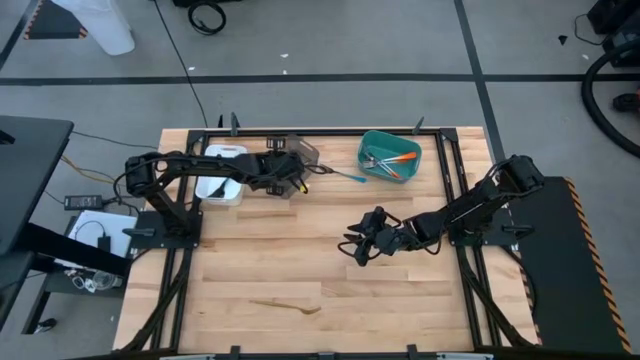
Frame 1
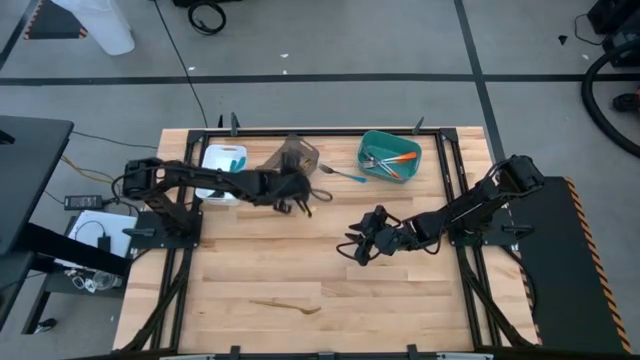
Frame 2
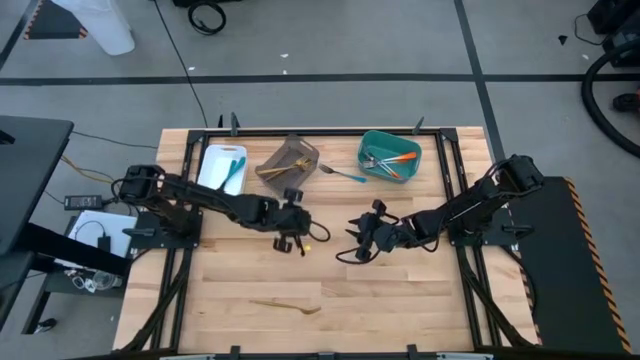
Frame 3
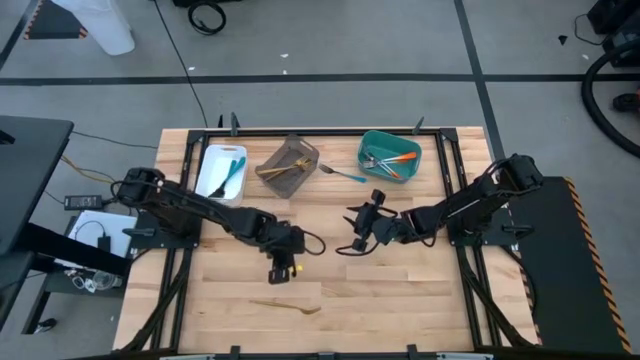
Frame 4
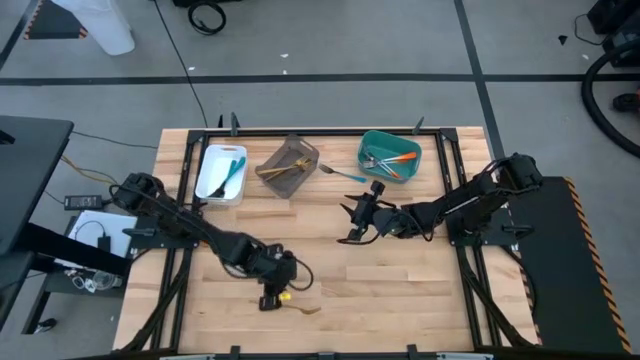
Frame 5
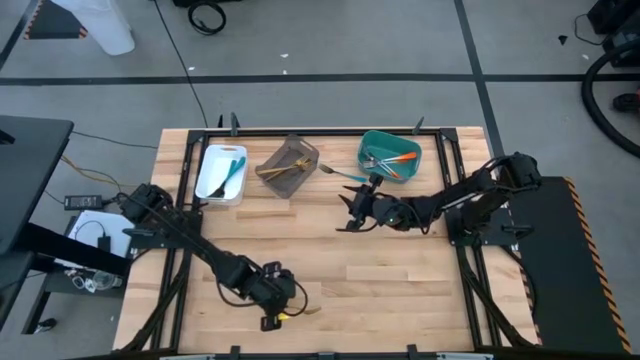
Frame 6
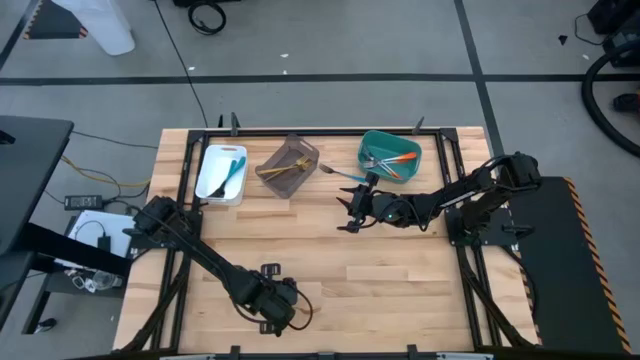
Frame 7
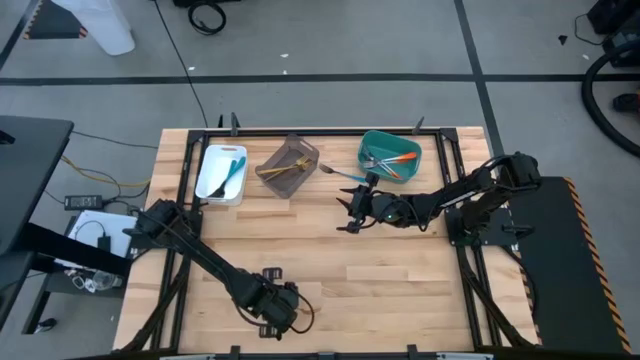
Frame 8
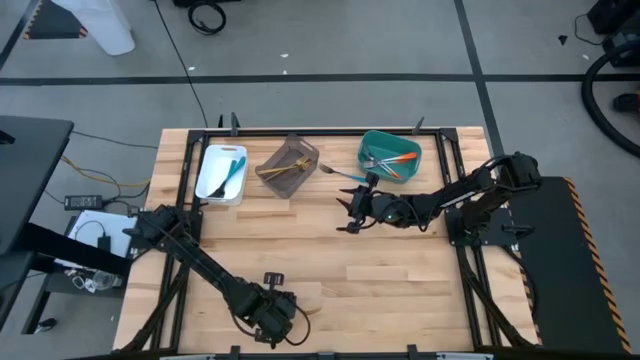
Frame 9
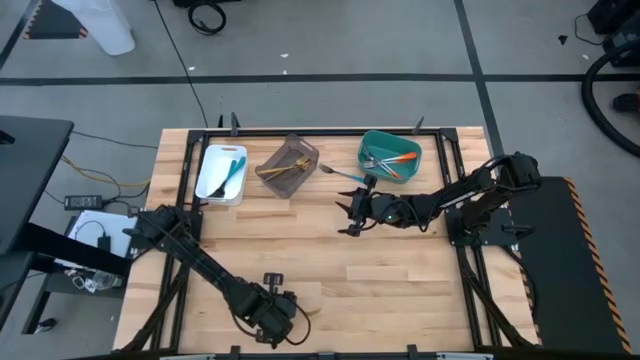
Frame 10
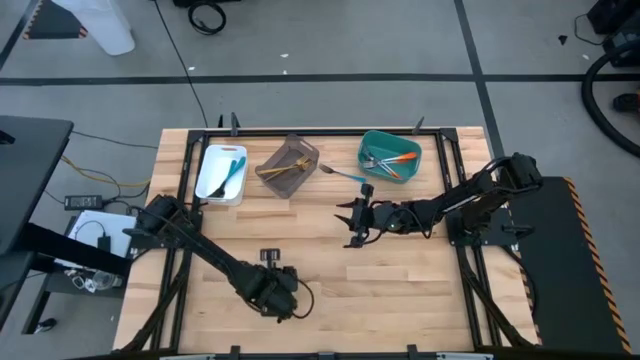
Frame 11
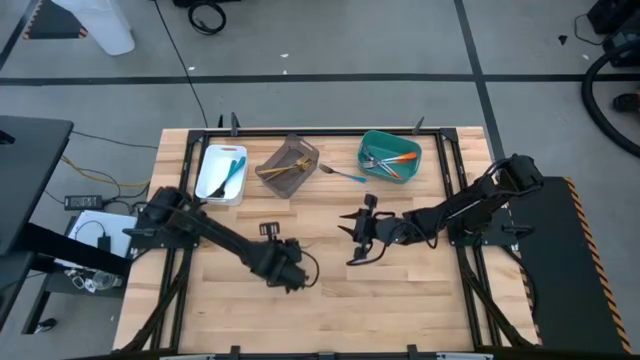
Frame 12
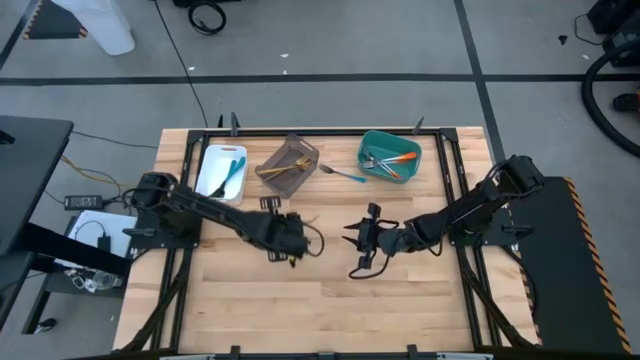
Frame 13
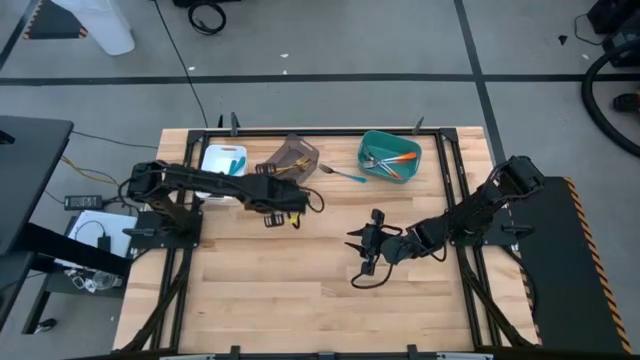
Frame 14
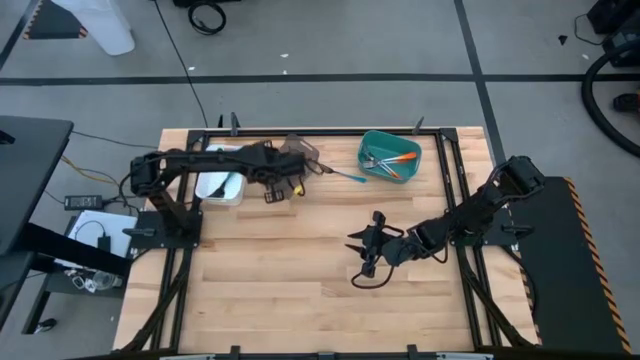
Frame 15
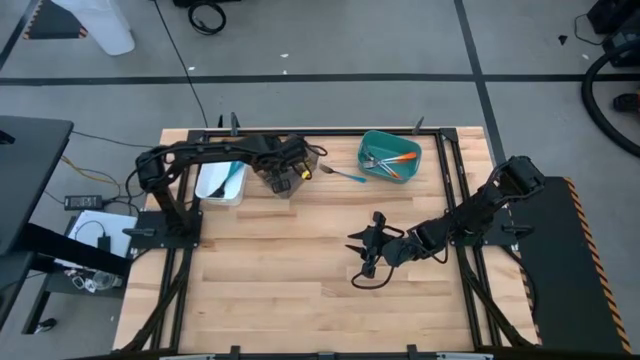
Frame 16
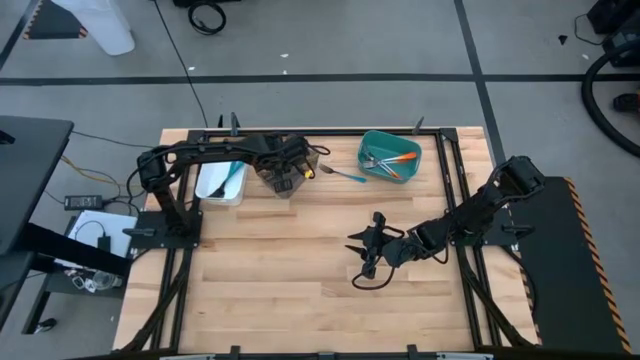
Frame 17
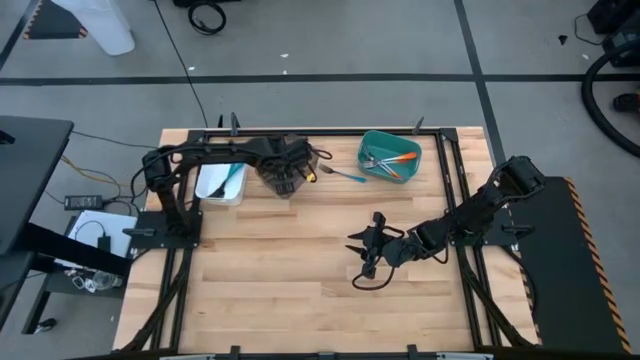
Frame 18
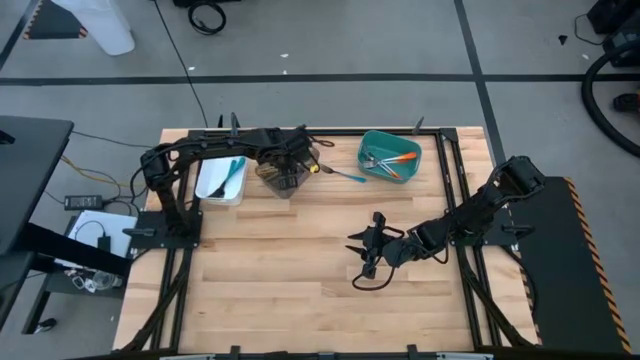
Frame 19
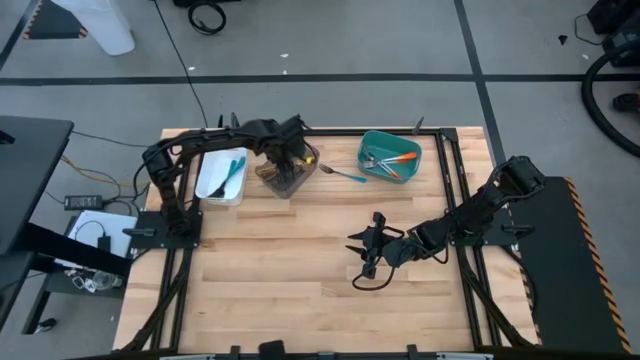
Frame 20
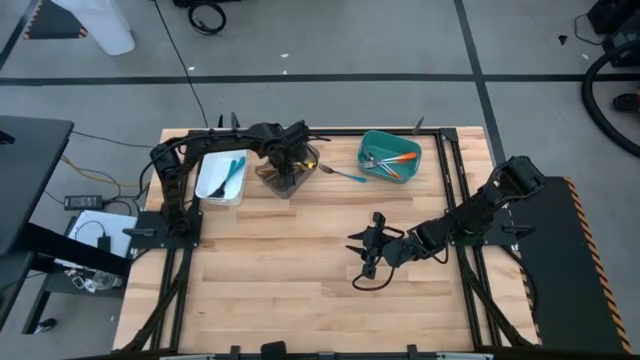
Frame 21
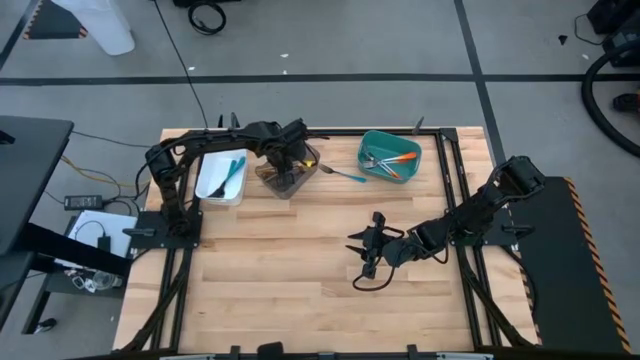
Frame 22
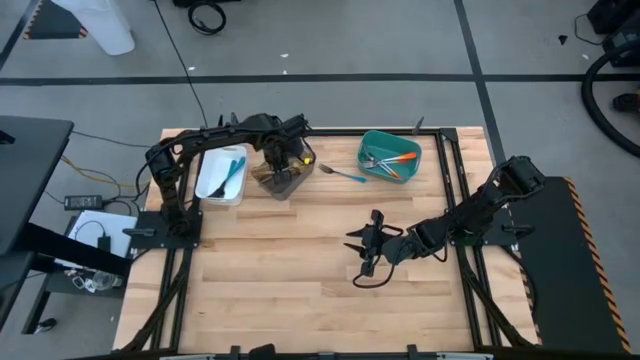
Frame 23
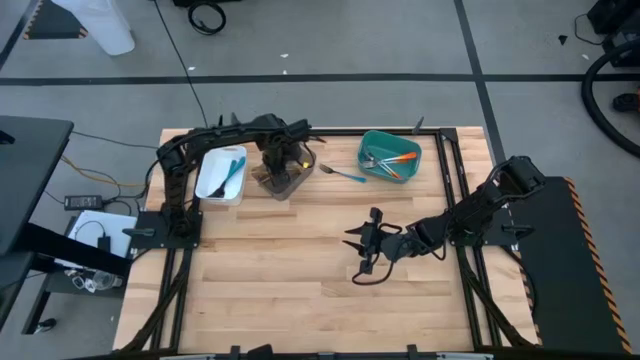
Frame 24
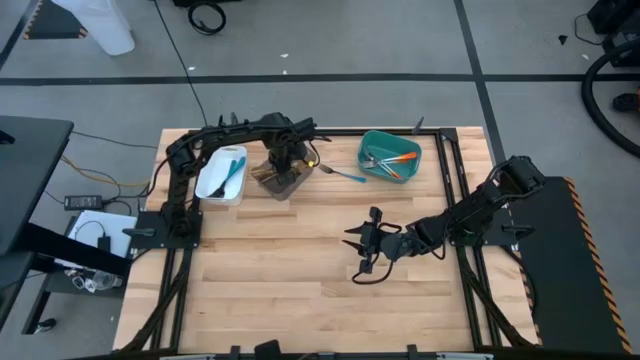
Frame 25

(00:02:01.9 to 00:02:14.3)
Task: Sort silverware by color (type)
Put the gold fork into the black bin

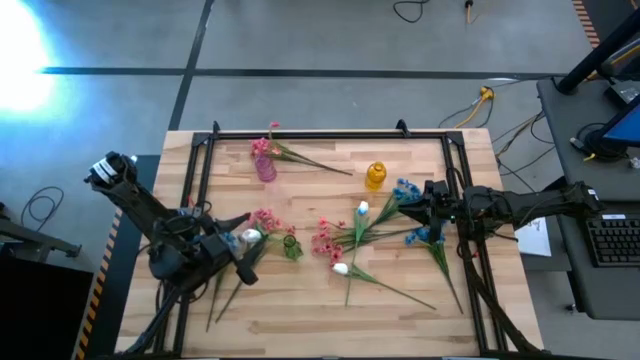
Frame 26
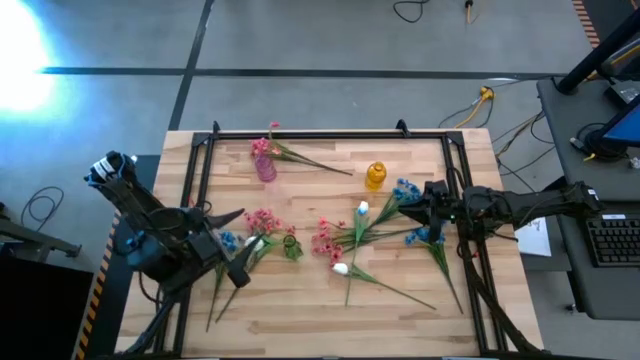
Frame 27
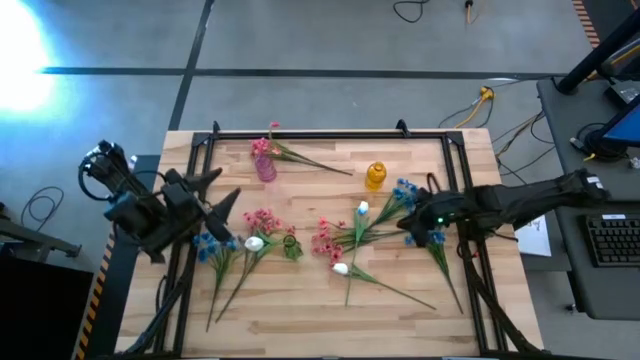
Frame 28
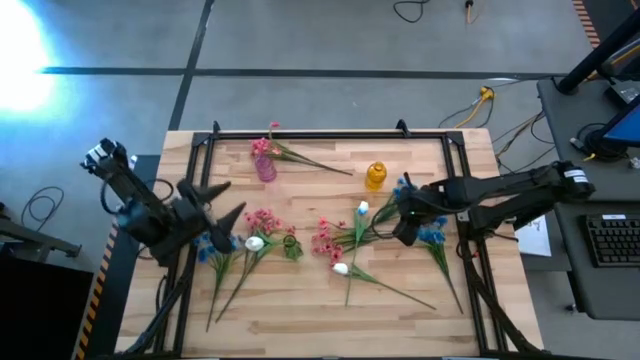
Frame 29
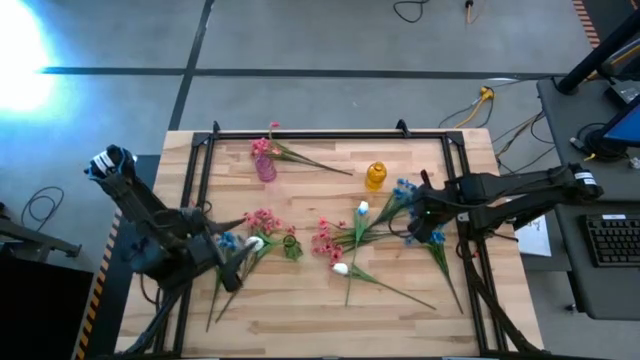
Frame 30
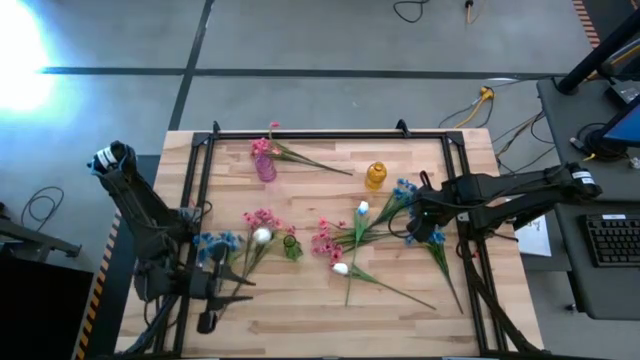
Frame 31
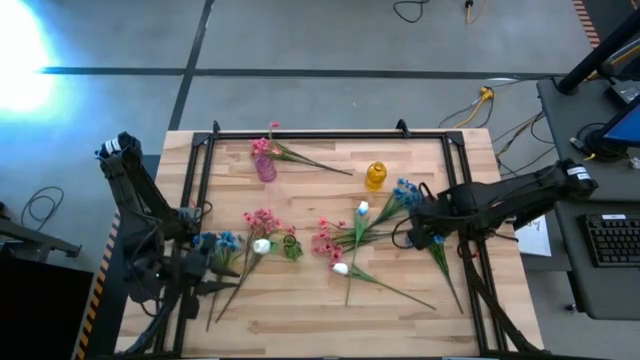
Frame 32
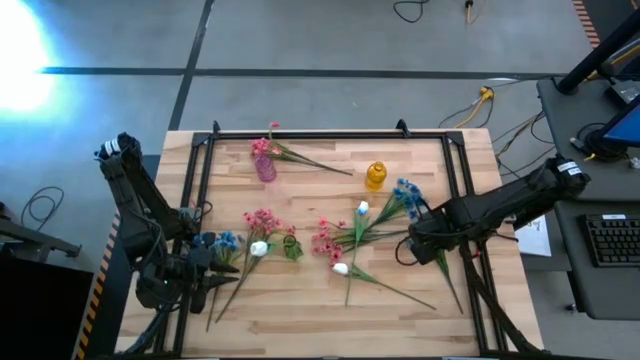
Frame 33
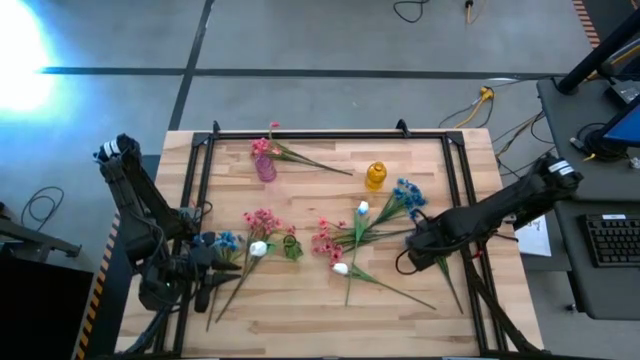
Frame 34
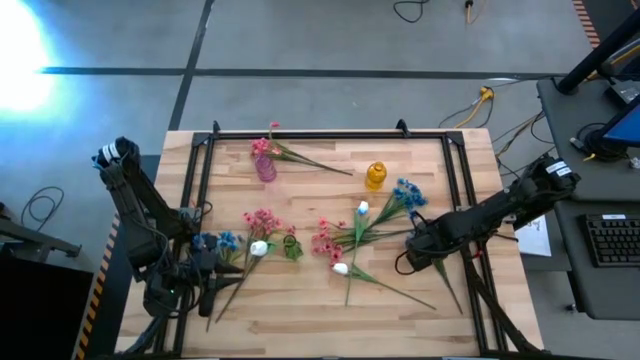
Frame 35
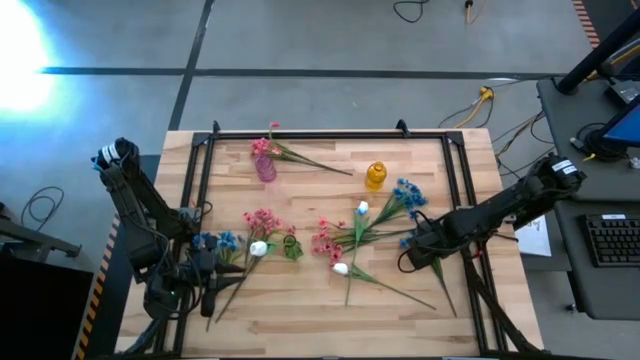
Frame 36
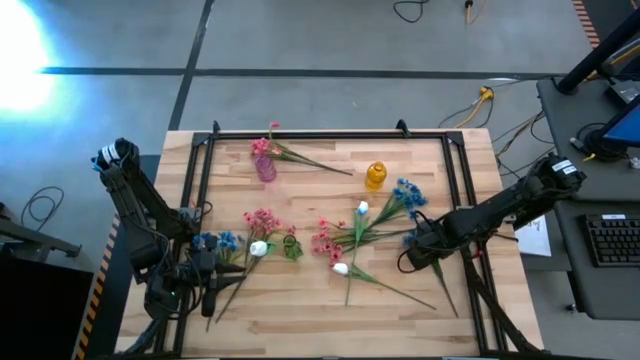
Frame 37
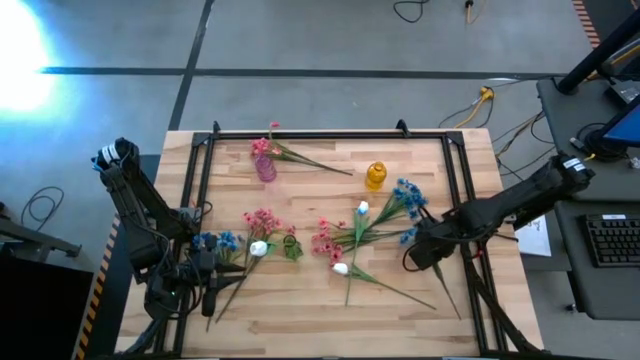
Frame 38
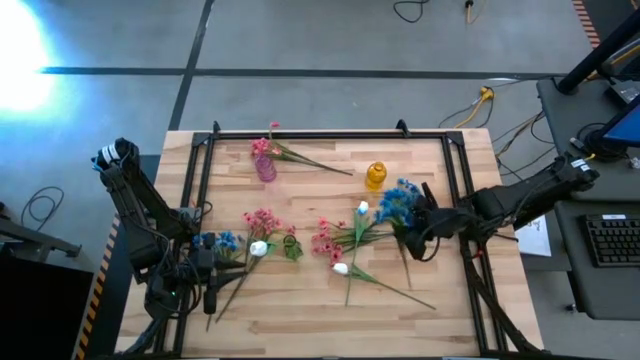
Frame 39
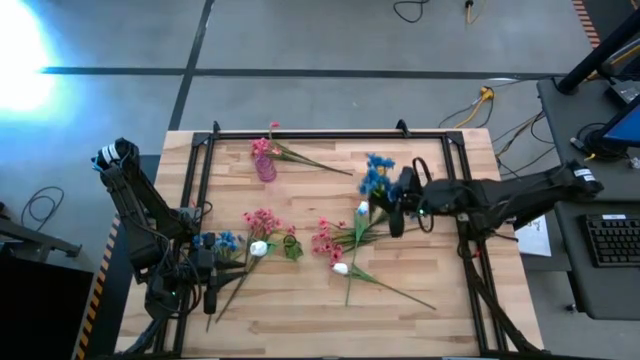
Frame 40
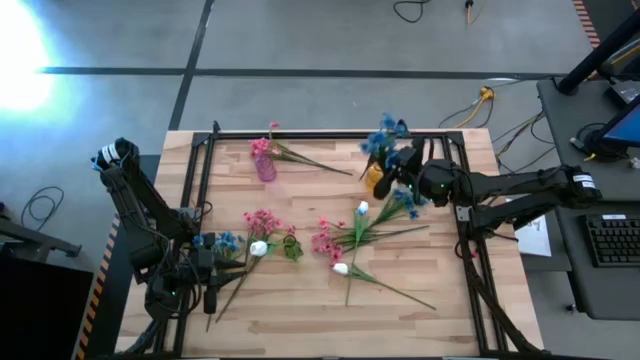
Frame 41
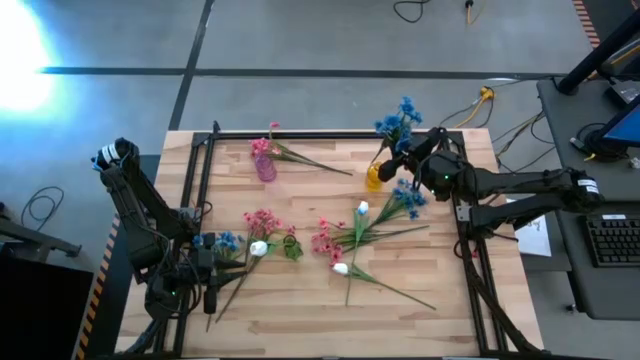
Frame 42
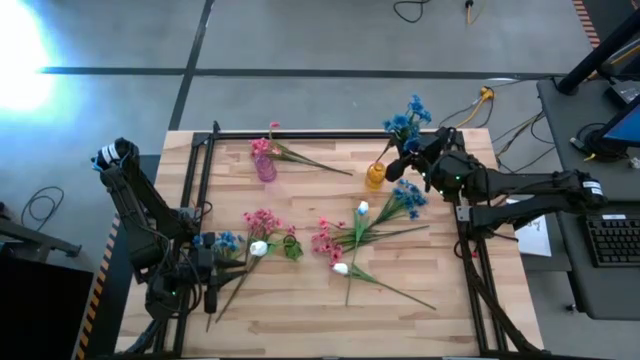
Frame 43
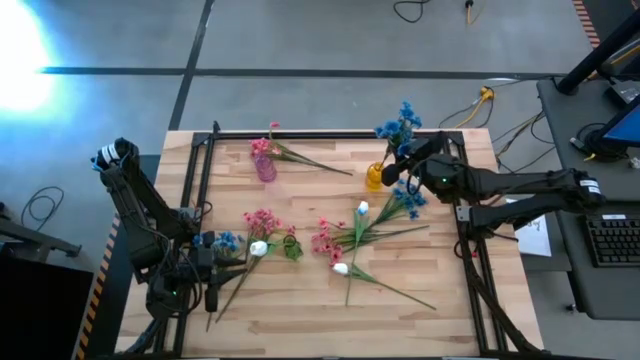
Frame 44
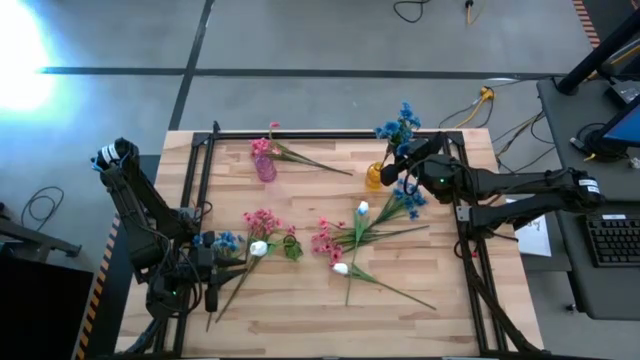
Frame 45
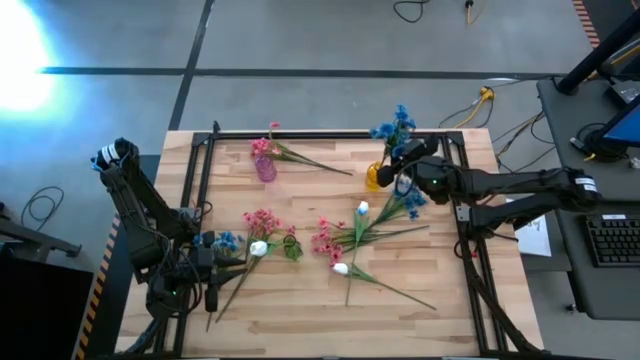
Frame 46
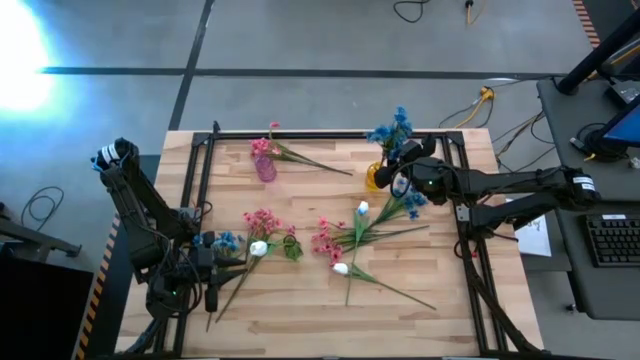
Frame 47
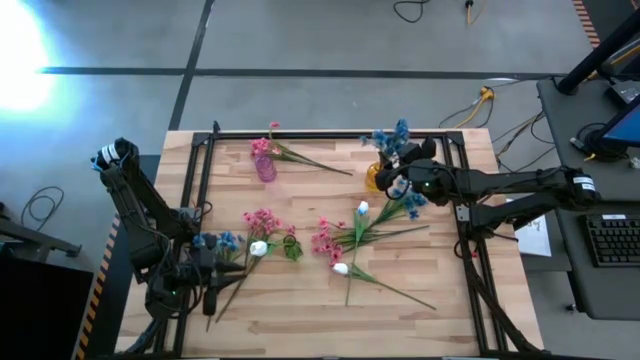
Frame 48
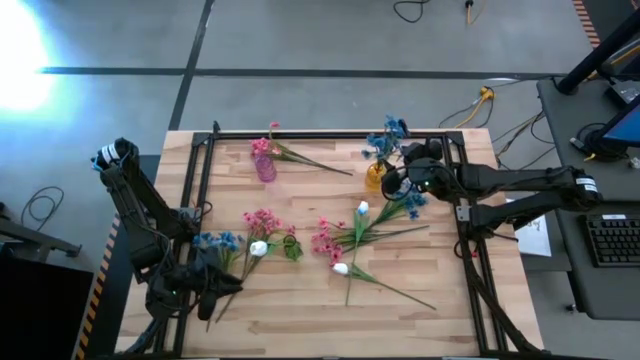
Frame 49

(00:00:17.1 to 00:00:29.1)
Task: Sort flowers into vase by color
Put the bottom right blue flowers into the yellow vase
